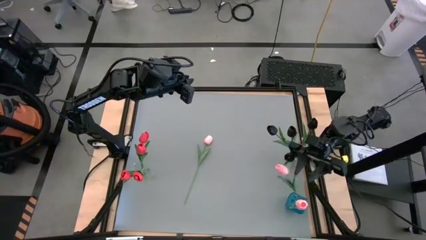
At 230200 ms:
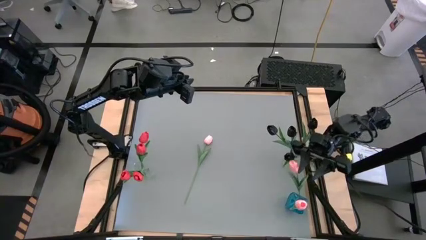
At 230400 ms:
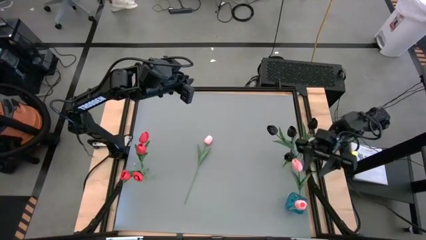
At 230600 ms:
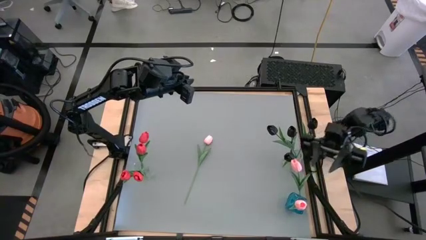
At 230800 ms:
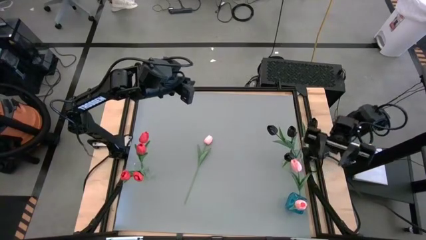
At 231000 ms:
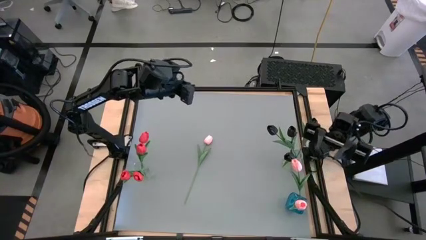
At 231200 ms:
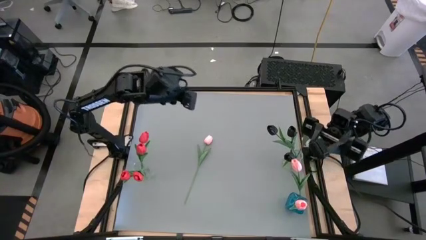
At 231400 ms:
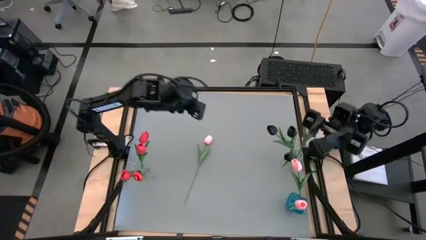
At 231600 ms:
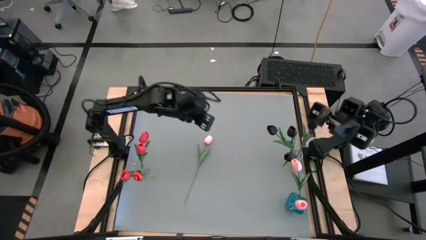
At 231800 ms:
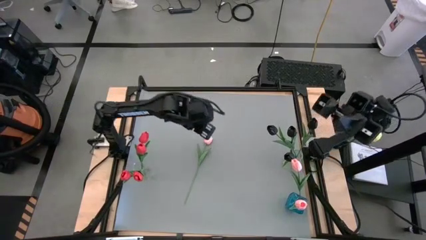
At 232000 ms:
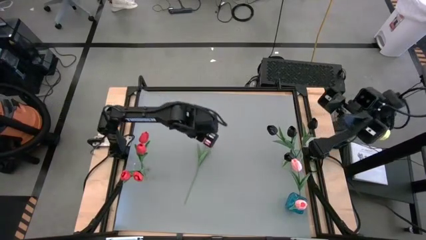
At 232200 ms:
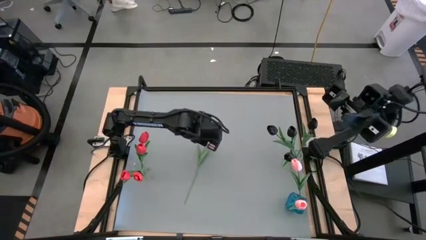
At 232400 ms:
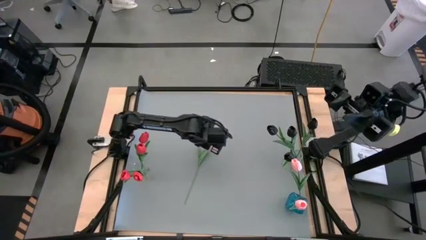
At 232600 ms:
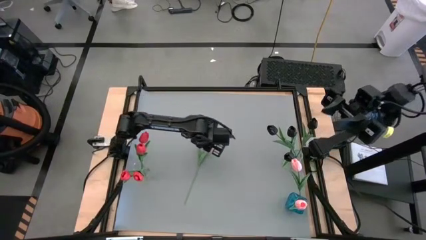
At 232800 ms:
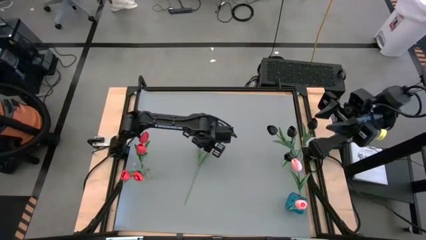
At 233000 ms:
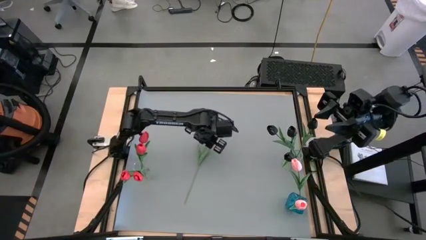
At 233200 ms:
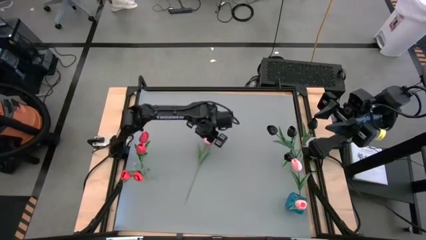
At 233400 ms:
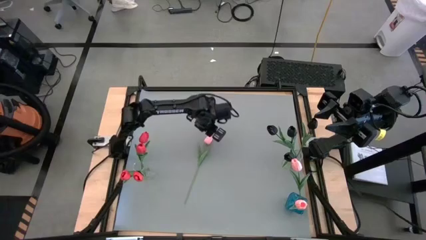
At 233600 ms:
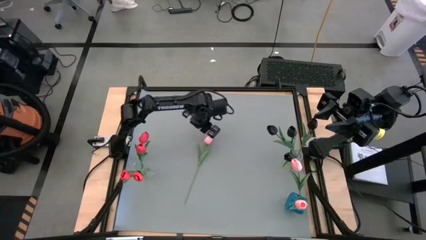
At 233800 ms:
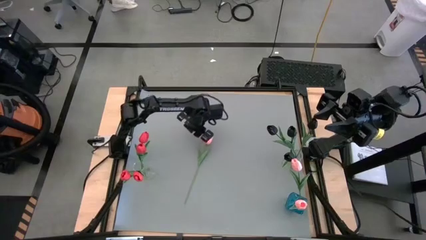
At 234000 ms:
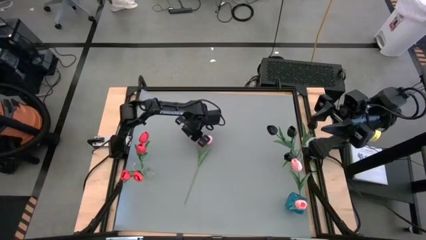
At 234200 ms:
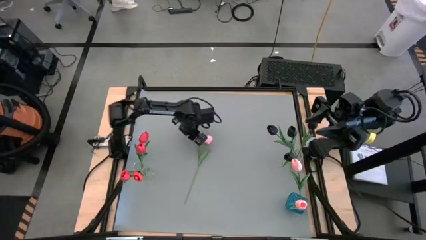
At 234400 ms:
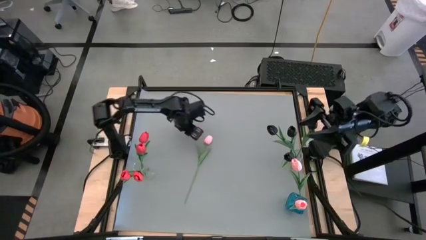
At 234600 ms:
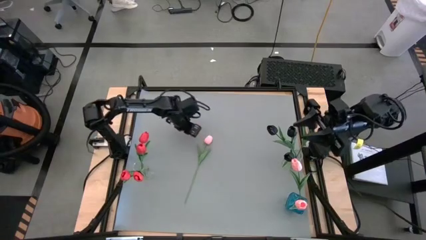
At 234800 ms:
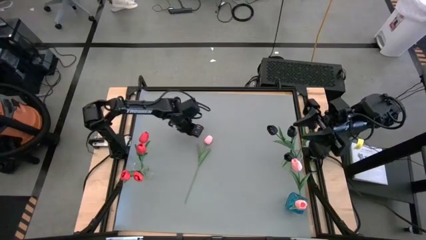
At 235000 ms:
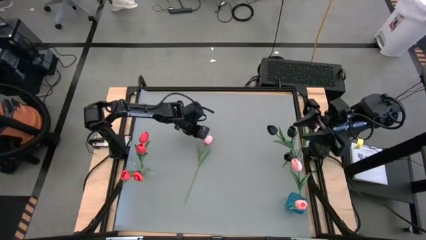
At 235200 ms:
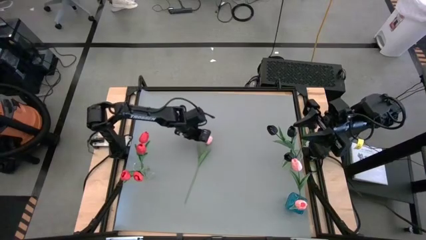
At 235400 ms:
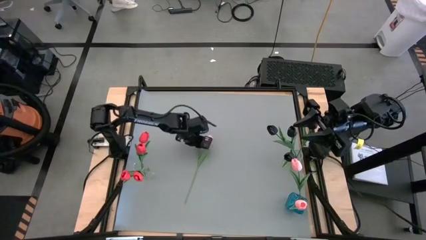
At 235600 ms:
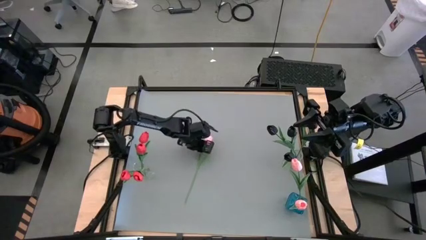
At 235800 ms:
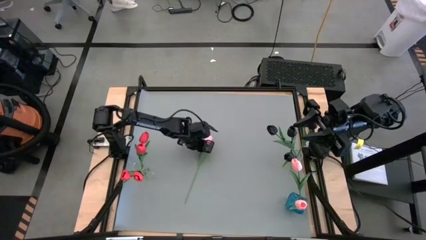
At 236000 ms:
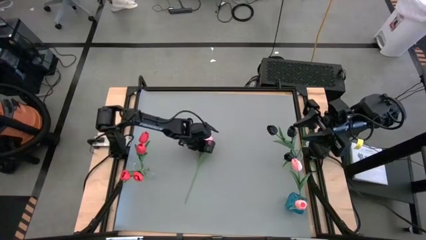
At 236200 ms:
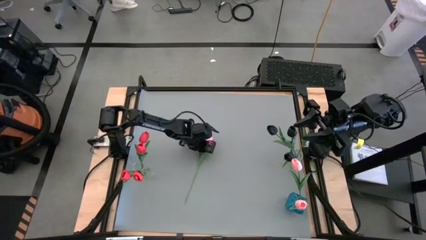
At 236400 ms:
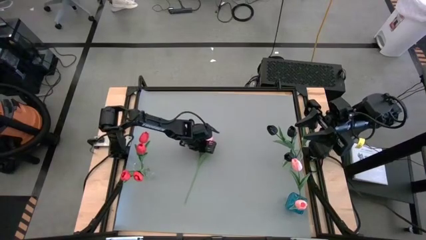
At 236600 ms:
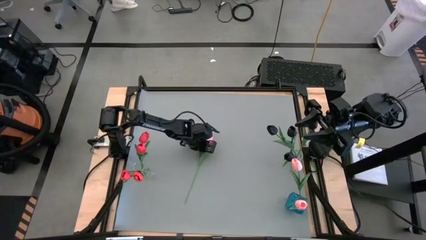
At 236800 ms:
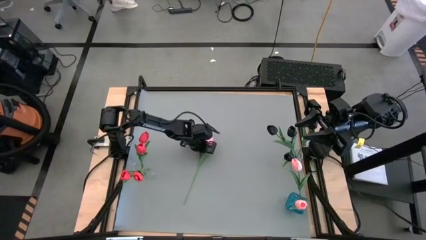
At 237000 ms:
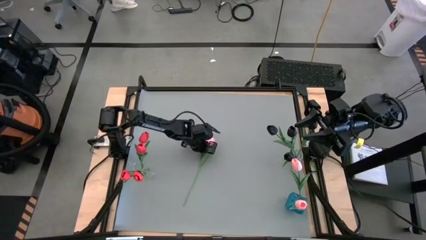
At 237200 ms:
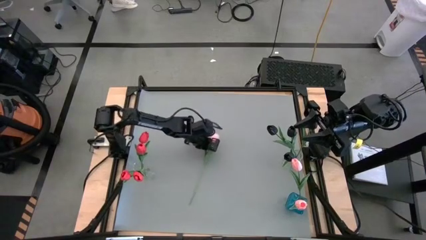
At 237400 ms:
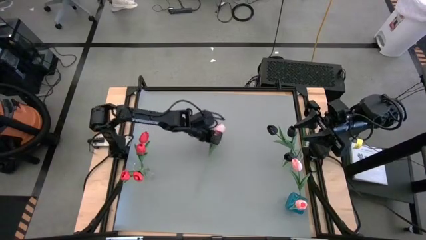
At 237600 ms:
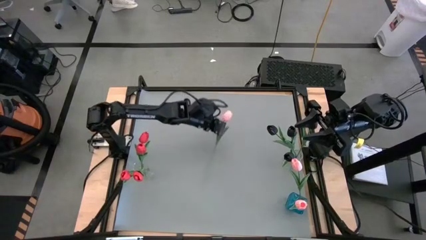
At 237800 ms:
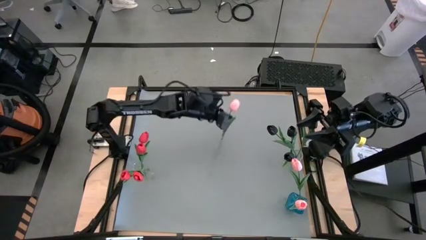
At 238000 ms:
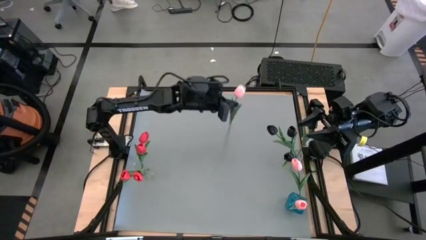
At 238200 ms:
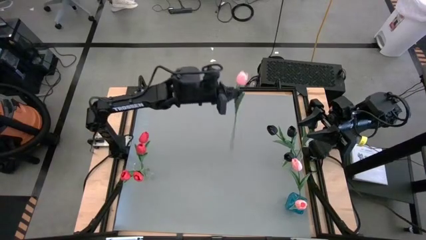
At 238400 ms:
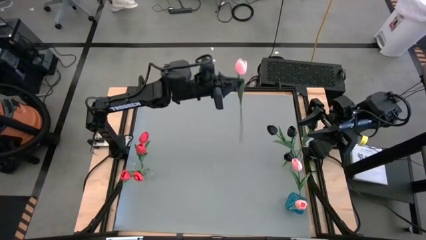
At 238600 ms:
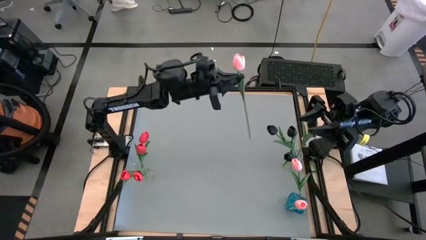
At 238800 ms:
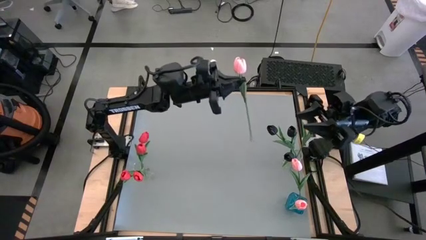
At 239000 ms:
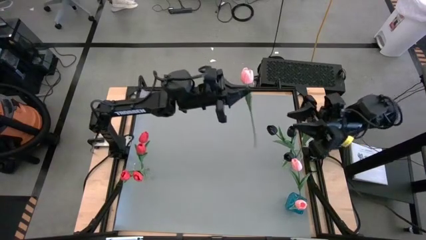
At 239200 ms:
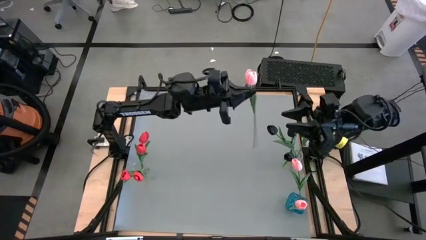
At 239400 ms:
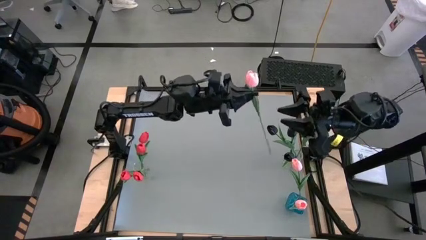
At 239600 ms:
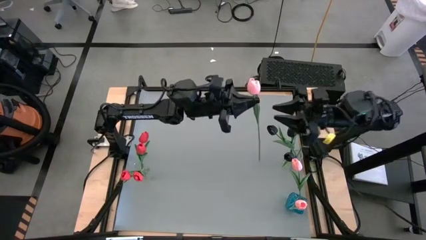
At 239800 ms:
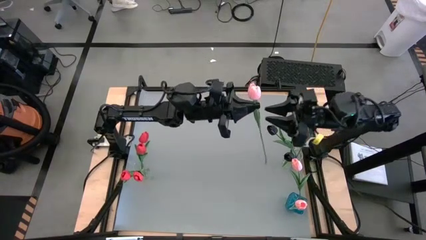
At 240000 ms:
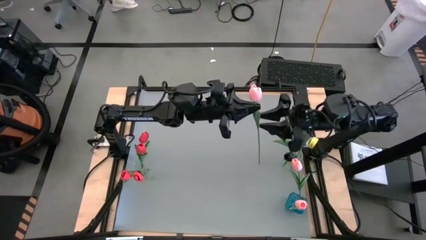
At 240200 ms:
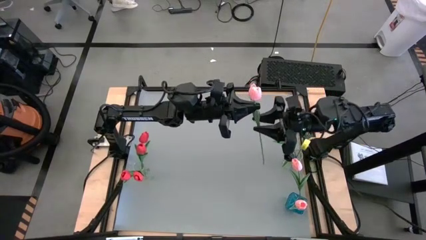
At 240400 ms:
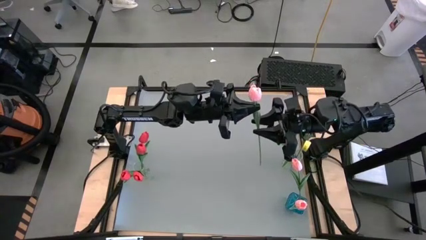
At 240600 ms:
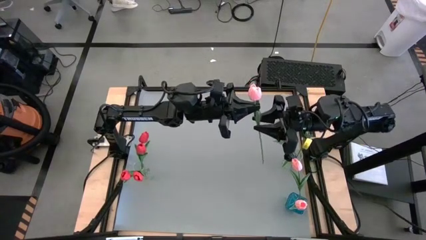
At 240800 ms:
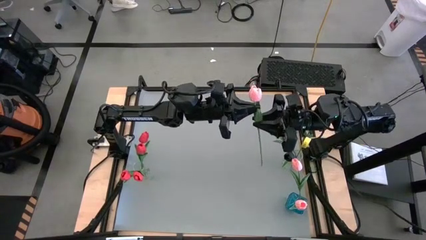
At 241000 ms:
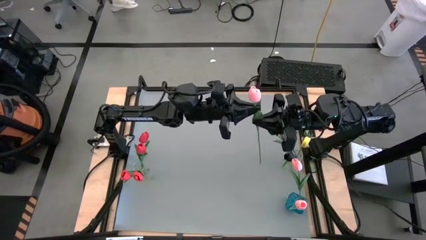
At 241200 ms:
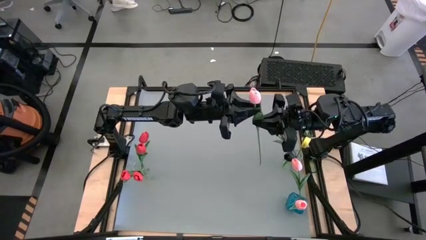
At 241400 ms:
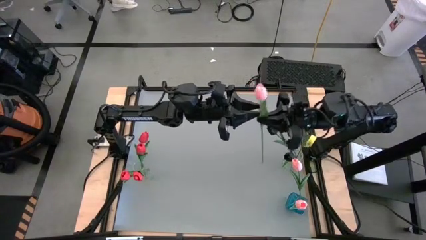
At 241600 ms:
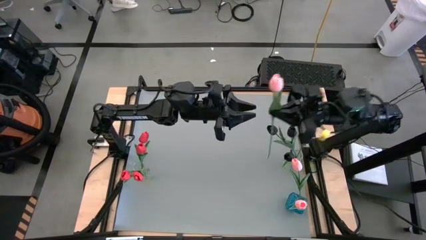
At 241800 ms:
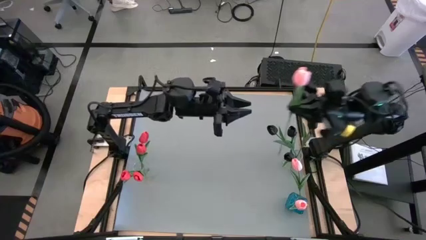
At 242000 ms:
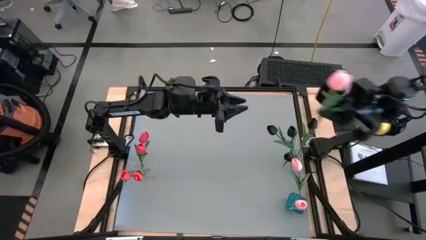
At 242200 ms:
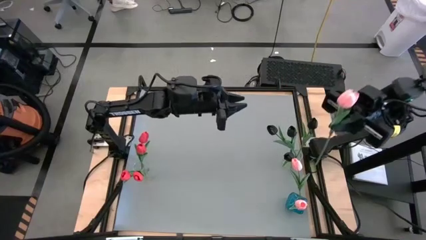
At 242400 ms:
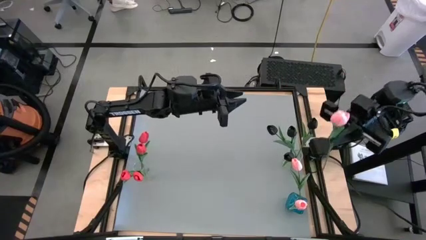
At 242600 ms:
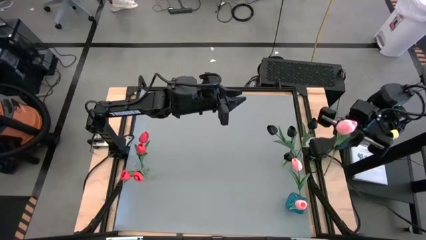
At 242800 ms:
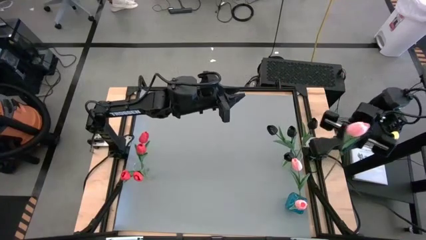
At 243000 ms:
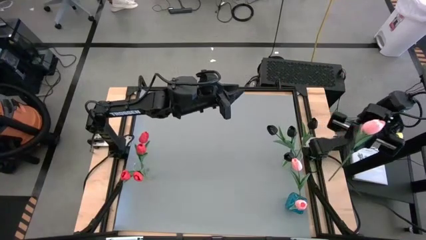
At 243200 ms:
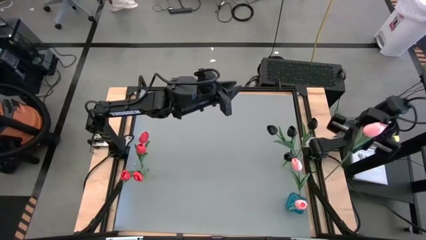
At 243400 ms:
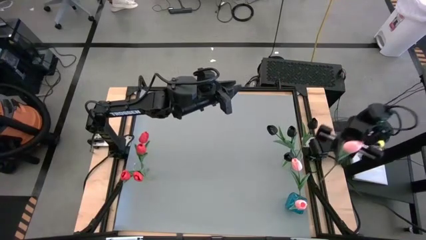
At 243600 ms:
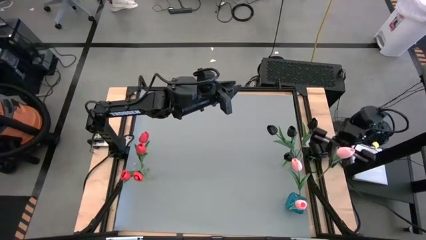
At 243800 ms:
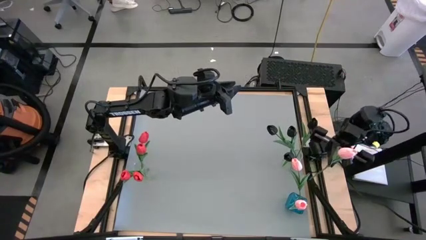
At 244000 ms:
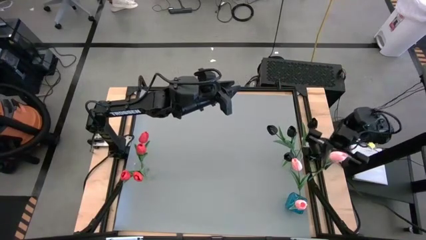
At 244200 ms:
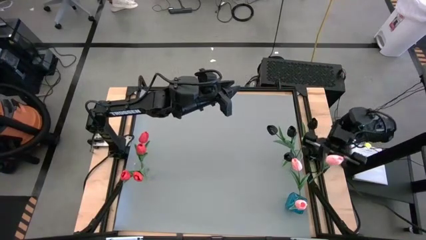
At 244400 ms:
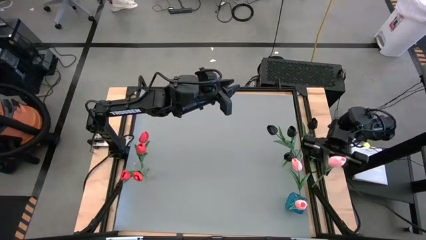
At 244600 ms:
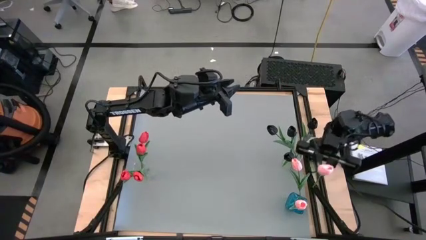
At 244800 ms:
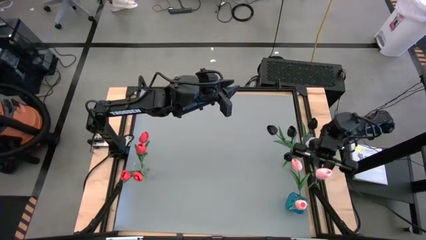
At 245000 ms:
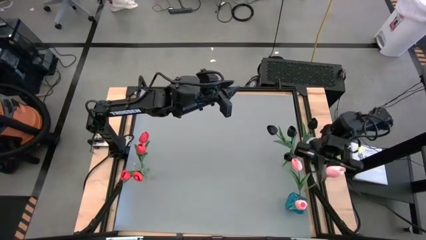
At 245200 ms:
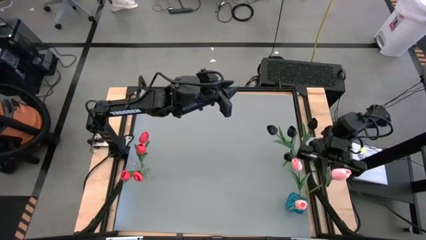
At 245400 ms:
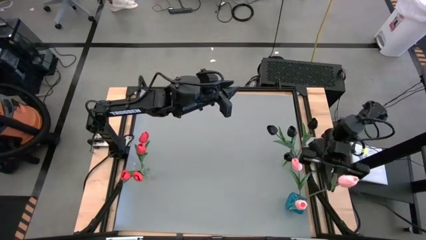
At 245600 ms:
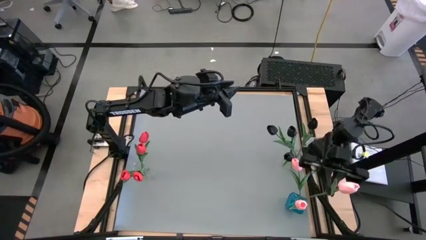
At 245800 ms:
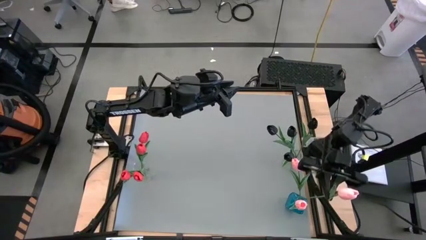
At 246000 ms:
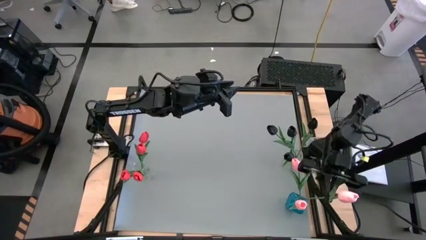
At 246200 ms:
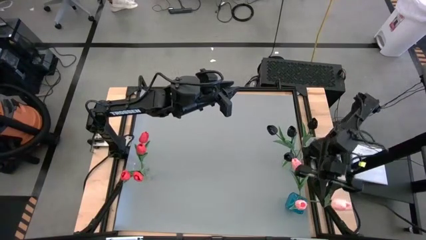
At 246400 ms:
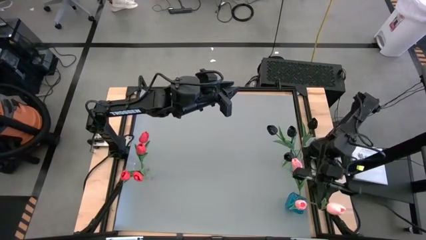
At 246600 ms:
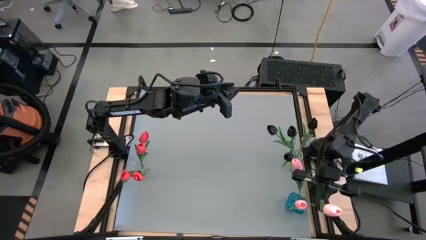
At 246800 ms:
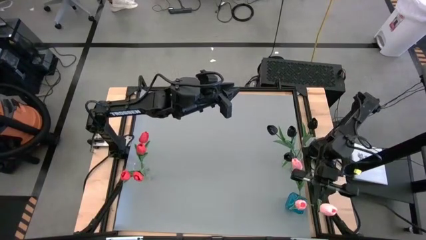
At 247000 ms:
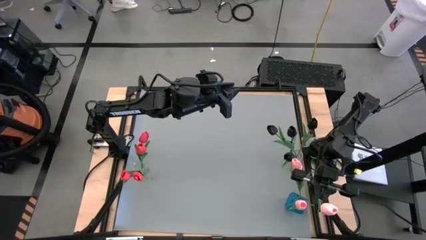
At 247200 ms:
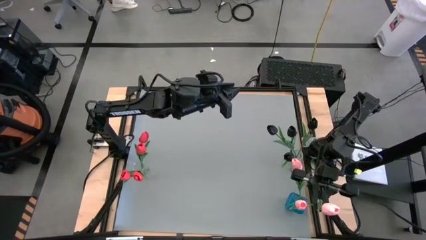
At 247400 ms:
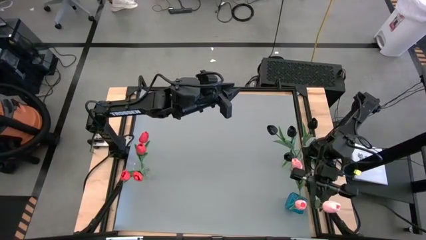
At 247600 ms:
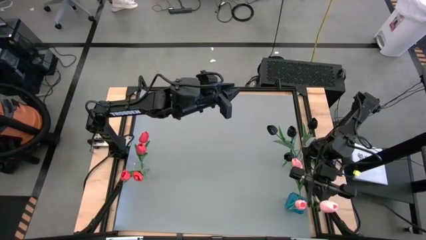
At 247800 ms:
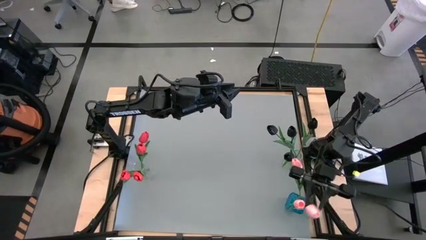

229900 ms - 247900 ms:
Task: Sort flowers into vase by color
Put the pink tulip into the blue vase
